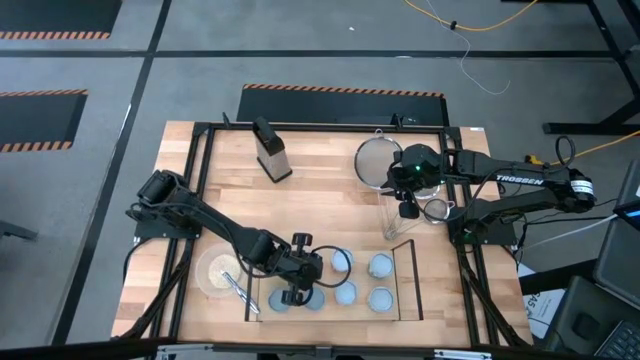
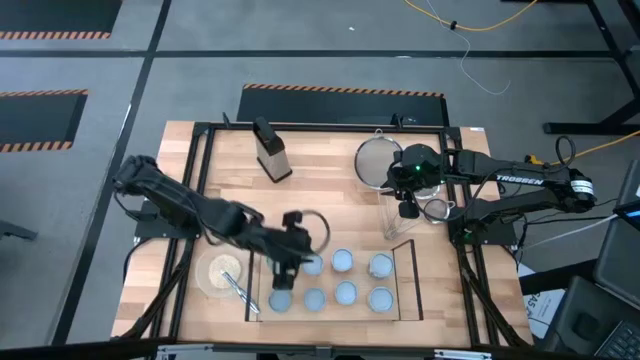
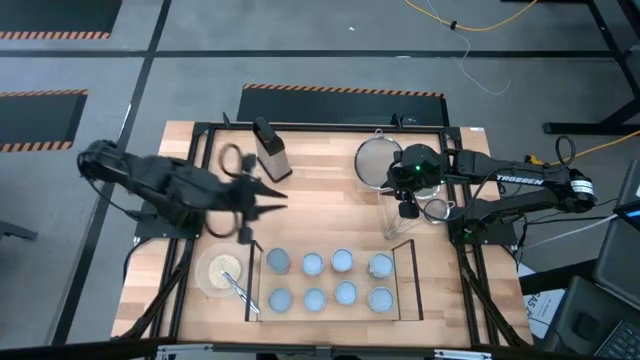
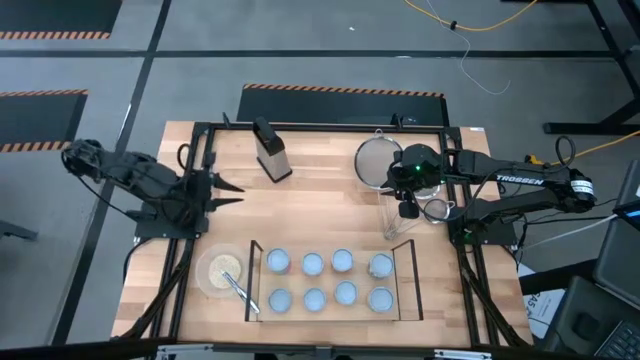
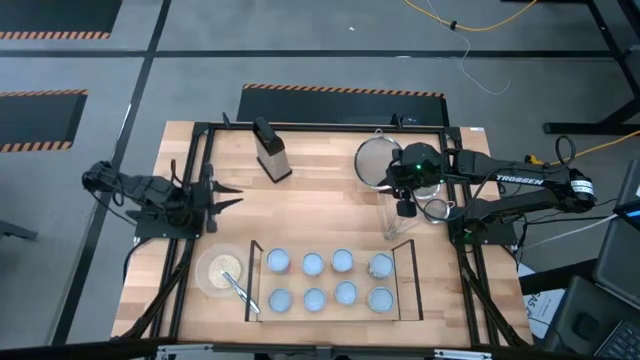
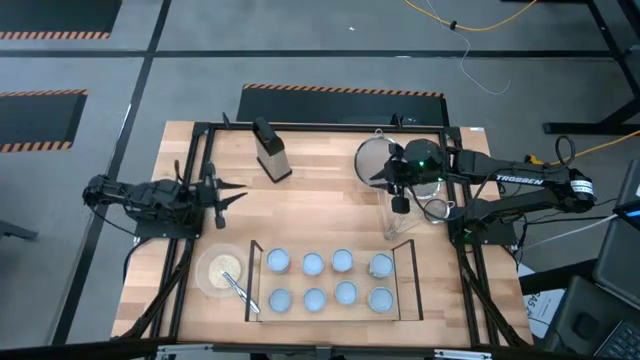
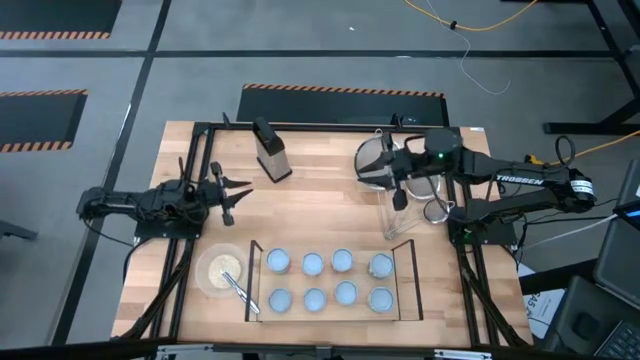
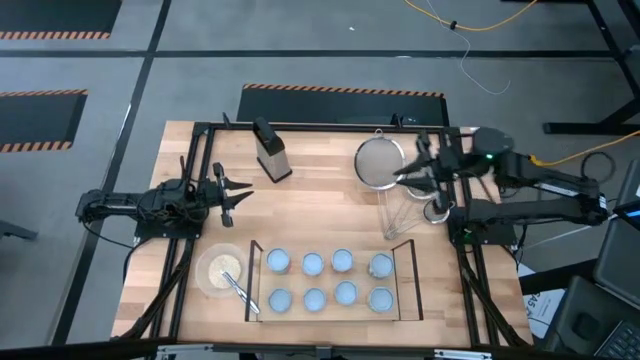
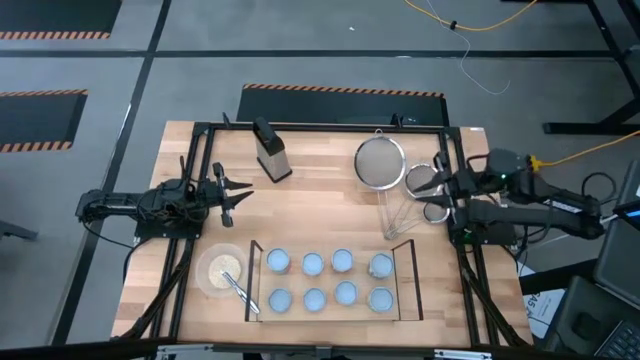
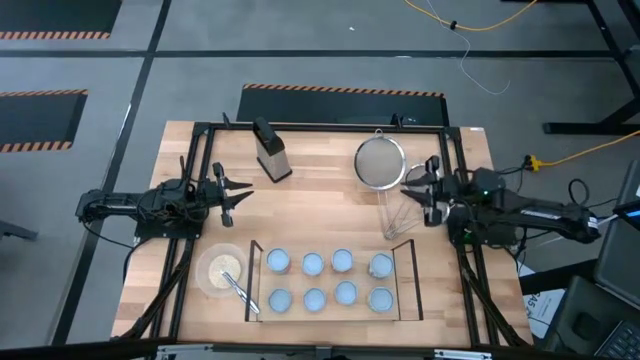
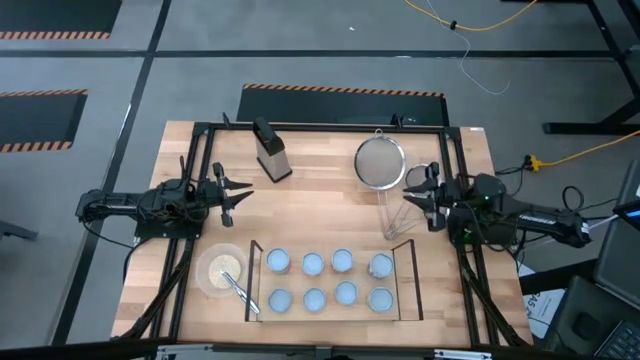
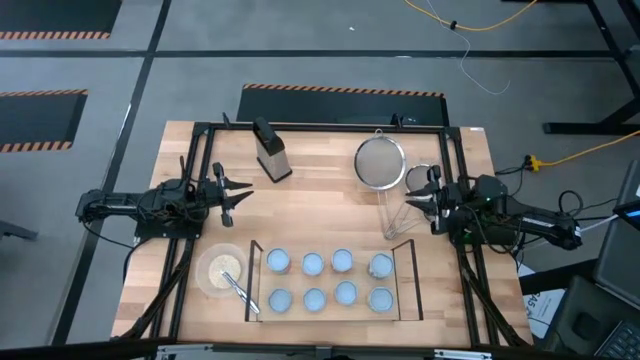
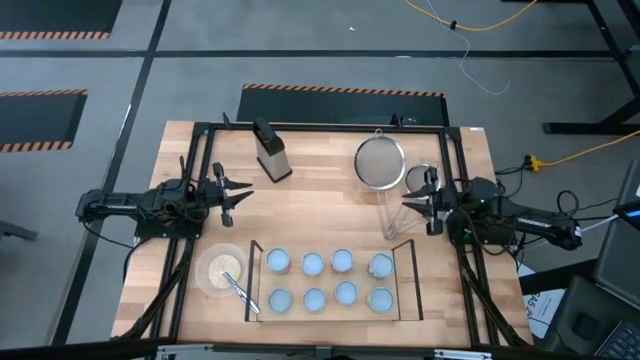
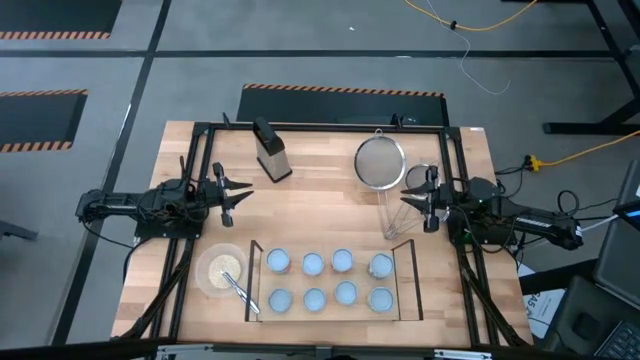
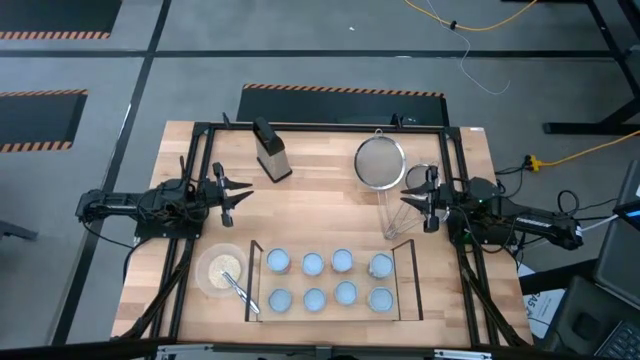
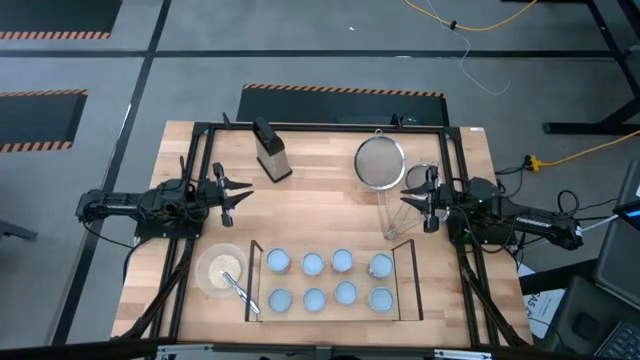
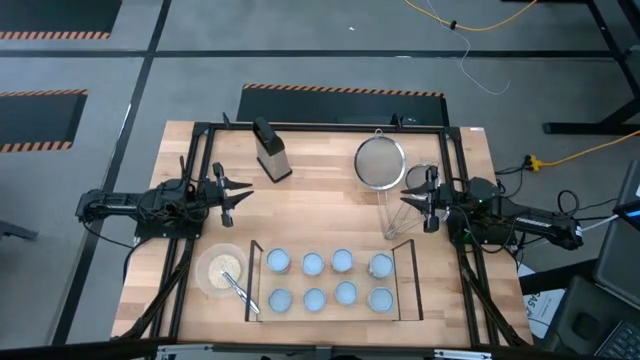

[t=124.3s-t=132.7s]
Task: Pick and place cans onto a shelf
Return to Home Position

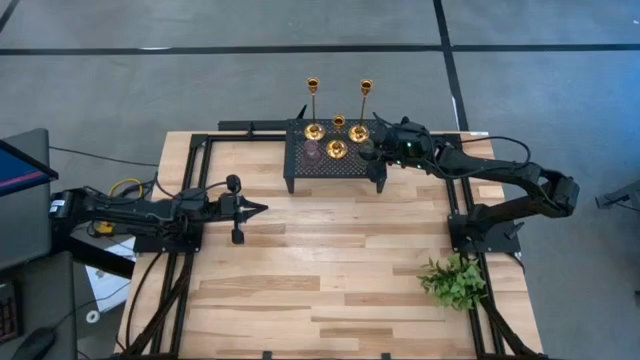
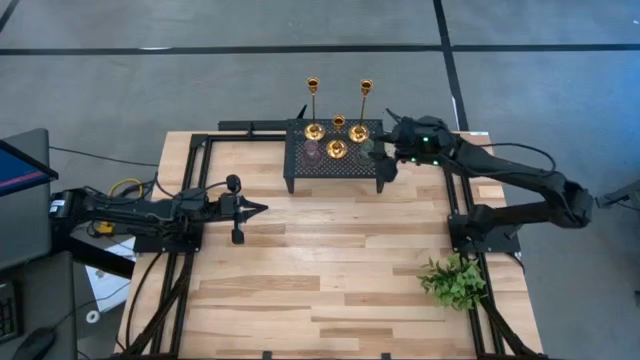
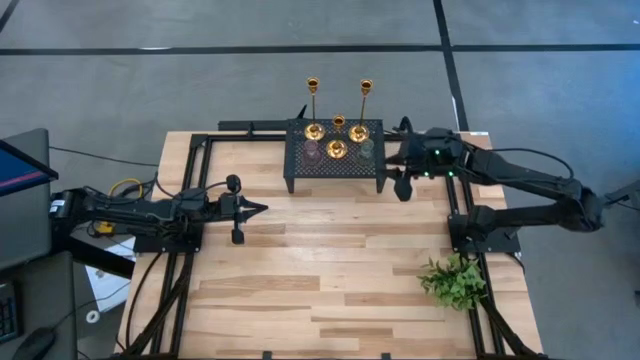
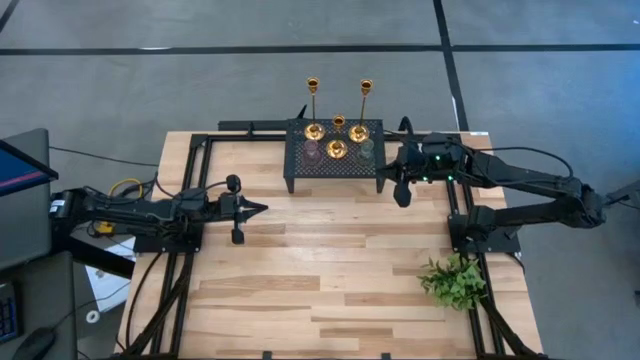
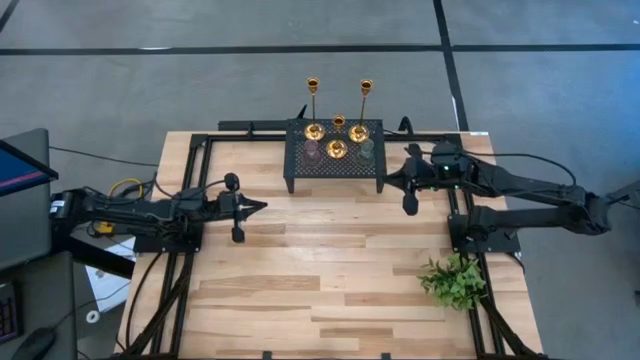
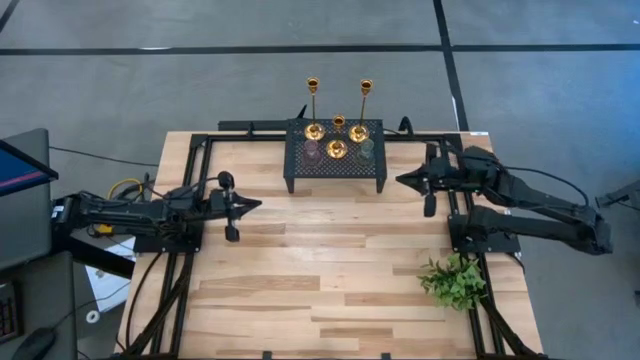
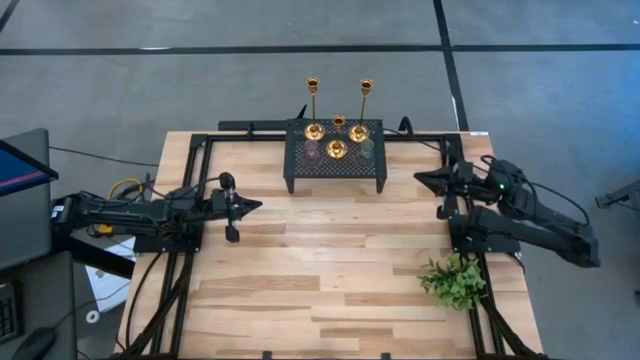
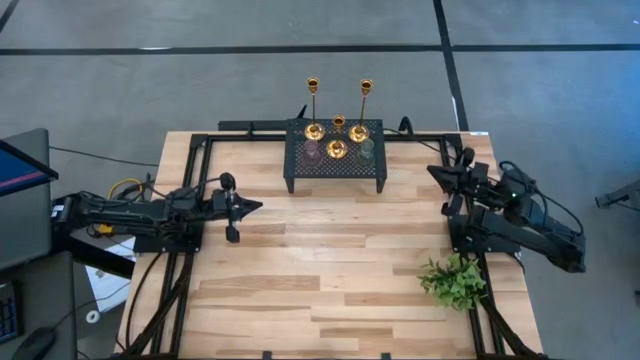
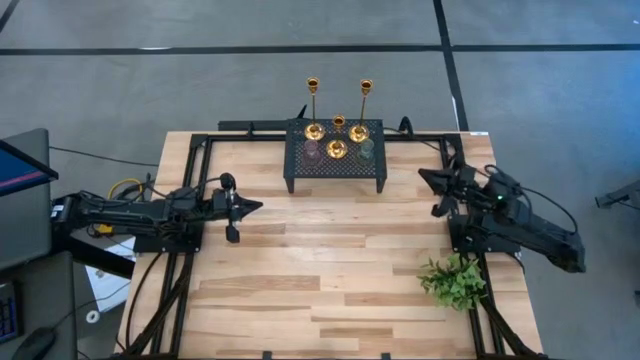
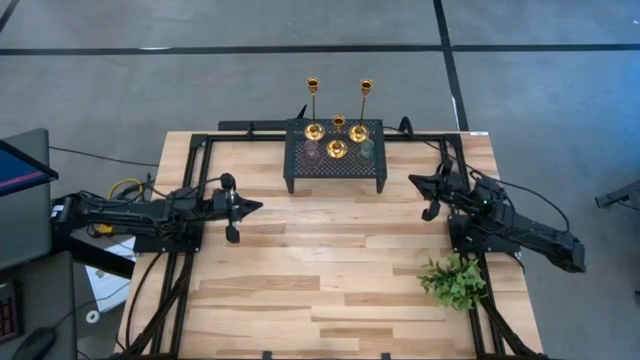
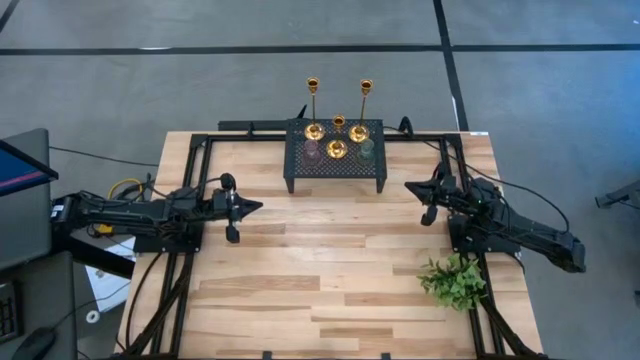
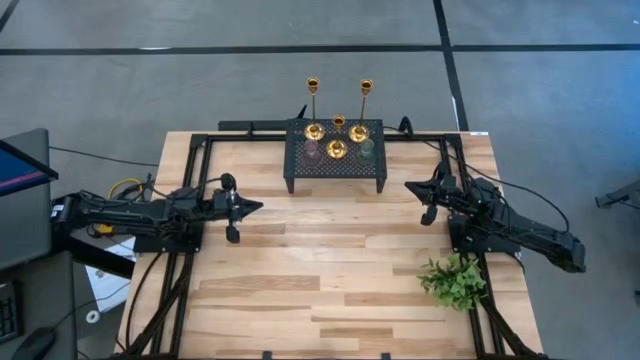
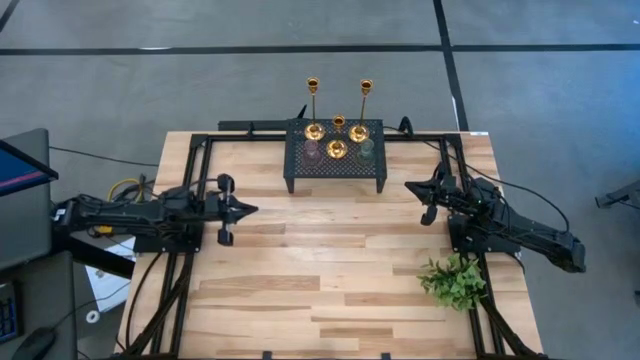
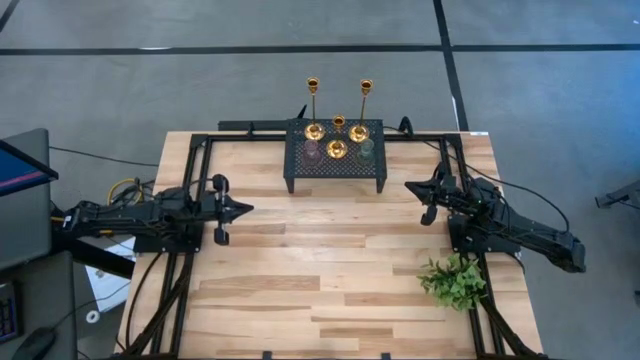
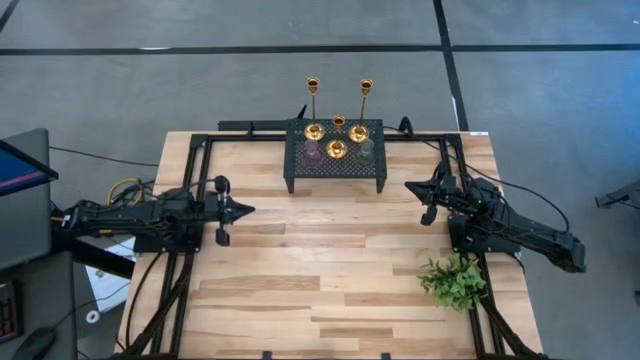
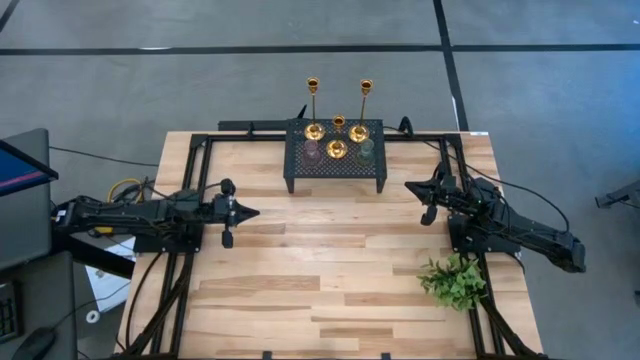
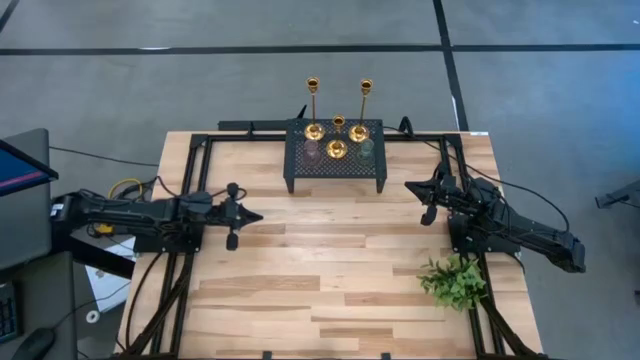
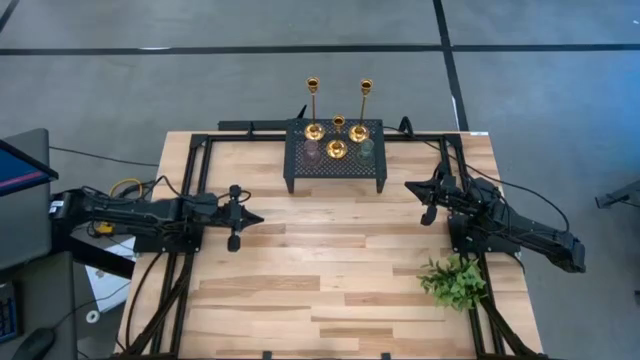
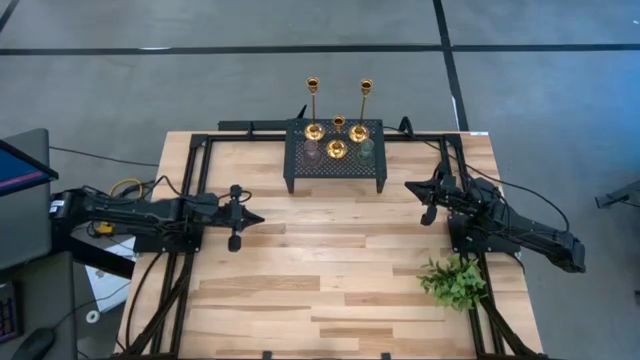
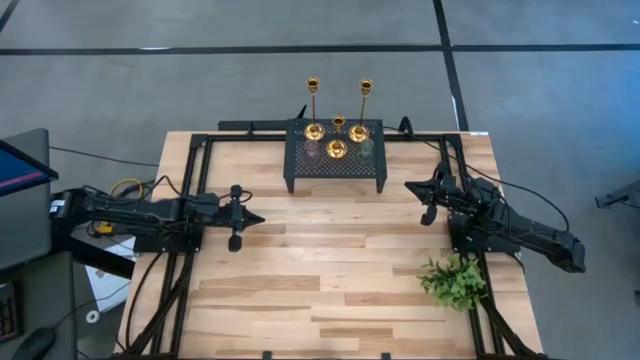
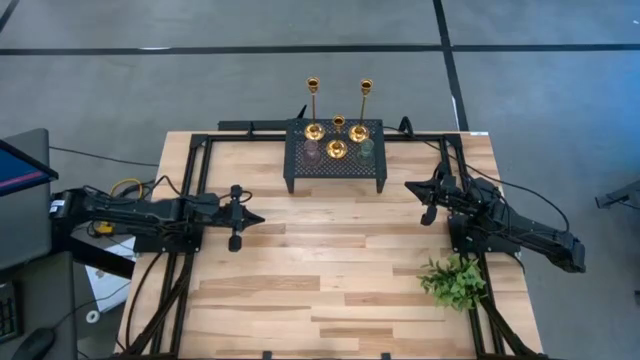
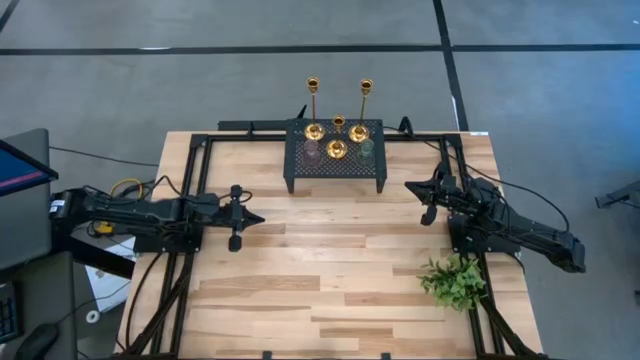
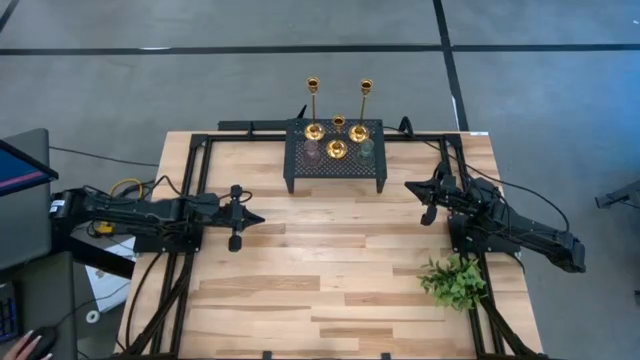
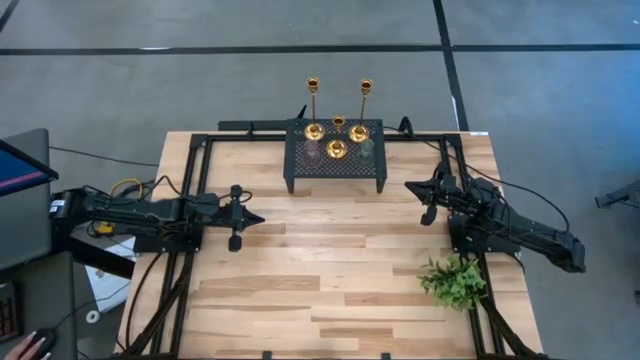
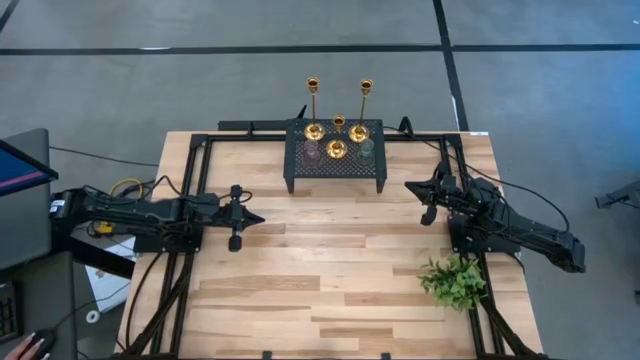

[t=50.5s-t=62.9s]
Task: Pick & Place candle stick holders
Return to Home Position
